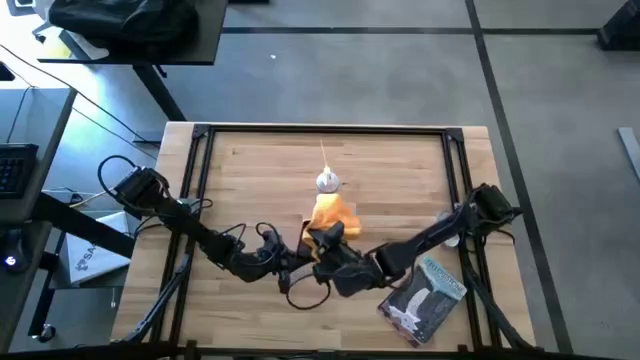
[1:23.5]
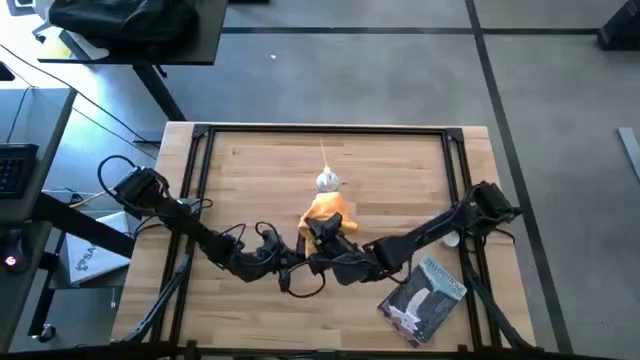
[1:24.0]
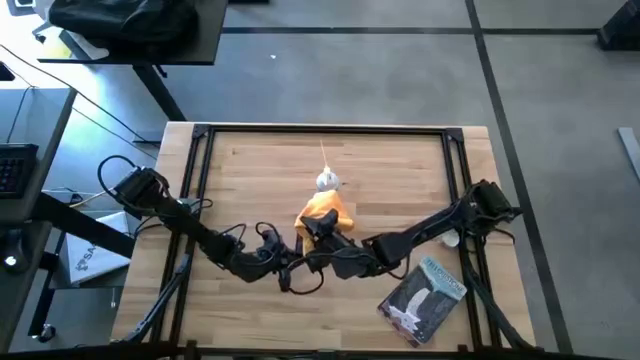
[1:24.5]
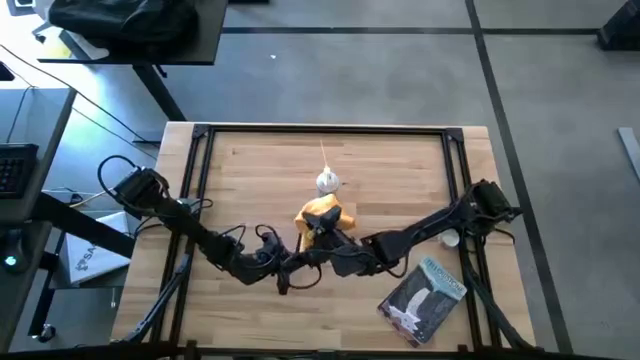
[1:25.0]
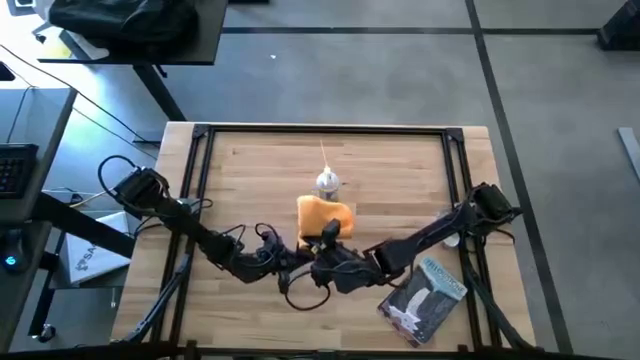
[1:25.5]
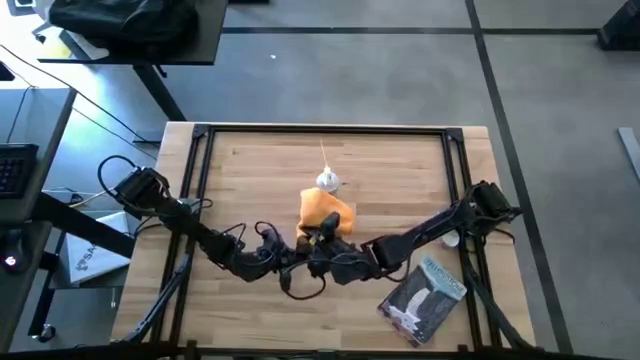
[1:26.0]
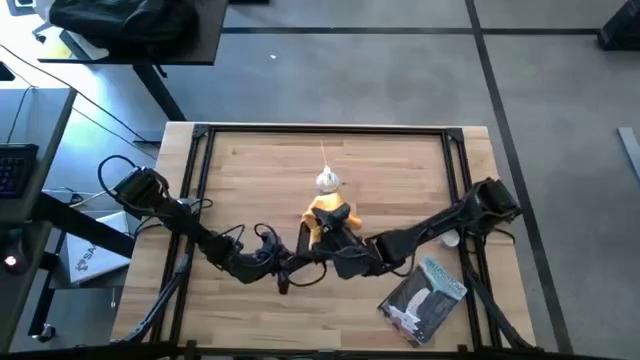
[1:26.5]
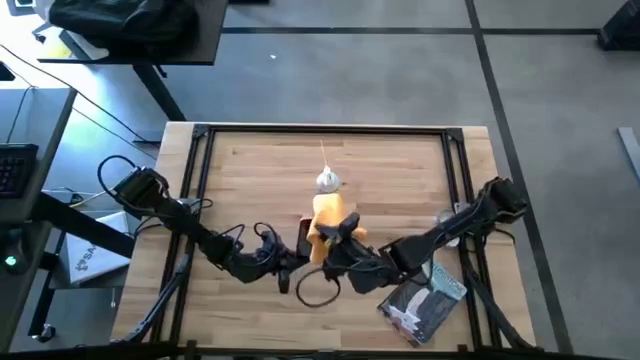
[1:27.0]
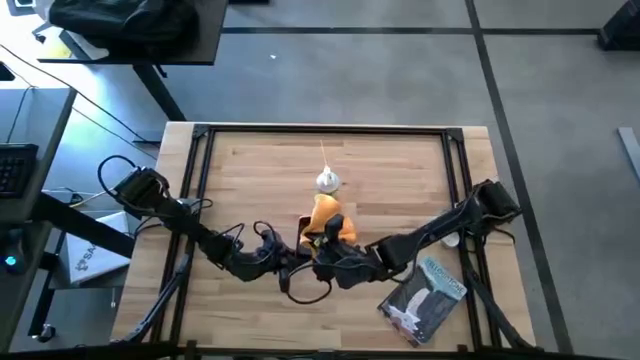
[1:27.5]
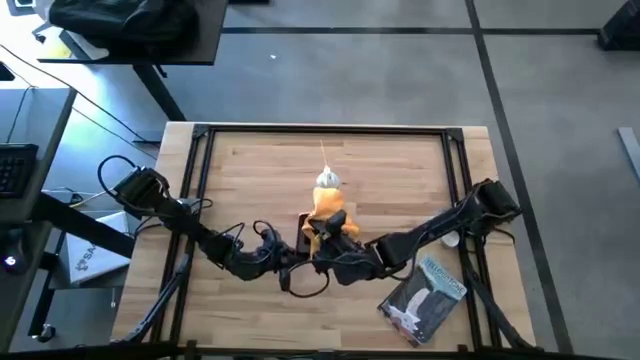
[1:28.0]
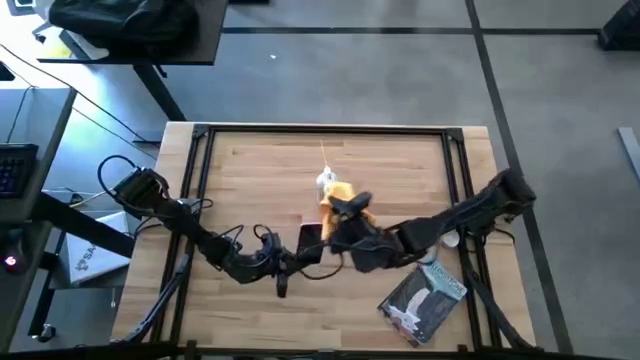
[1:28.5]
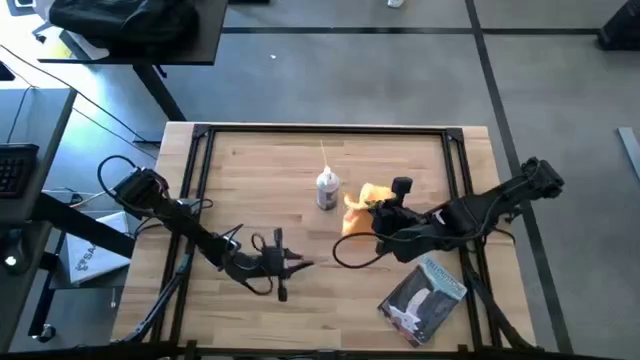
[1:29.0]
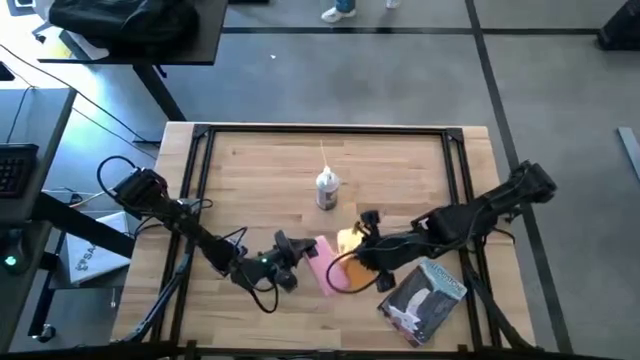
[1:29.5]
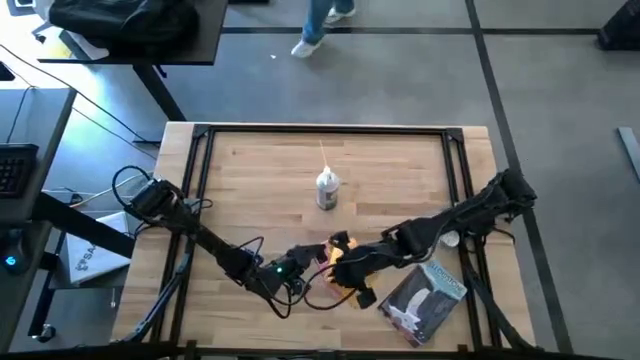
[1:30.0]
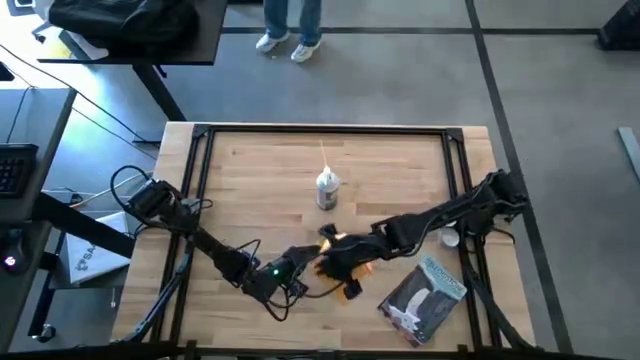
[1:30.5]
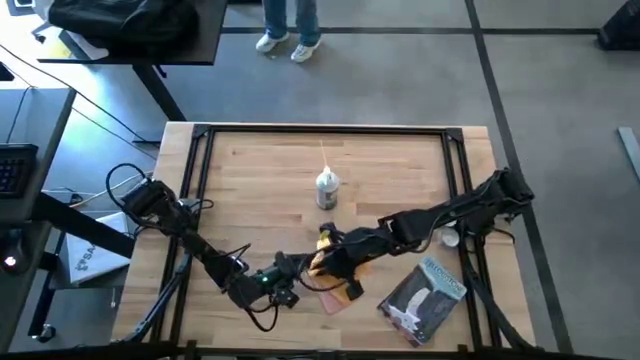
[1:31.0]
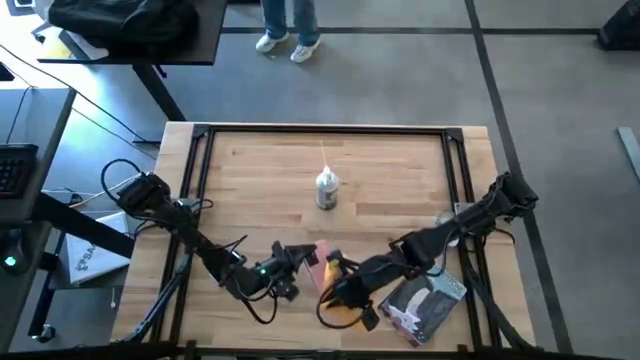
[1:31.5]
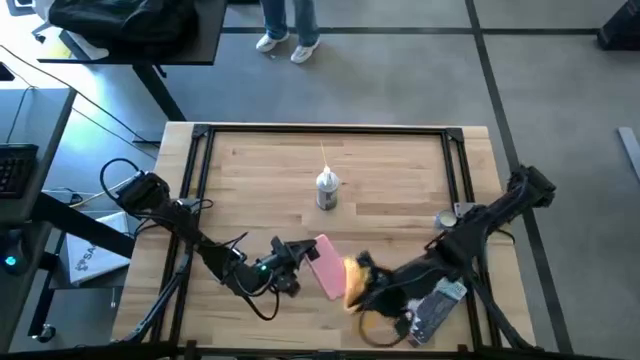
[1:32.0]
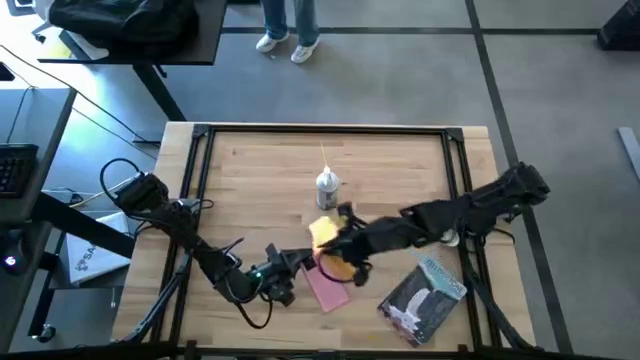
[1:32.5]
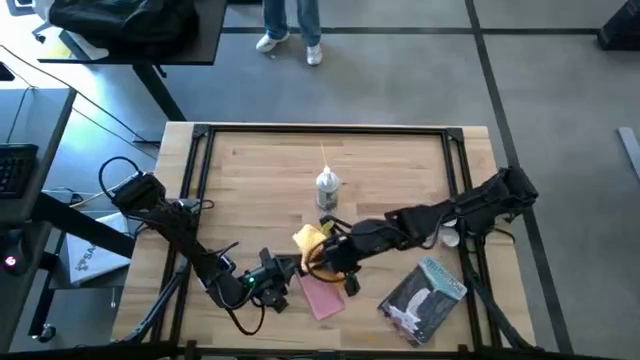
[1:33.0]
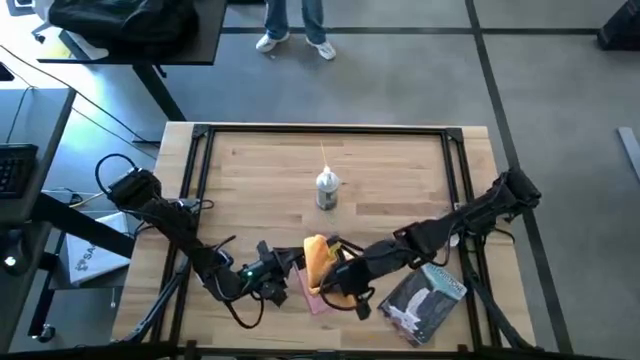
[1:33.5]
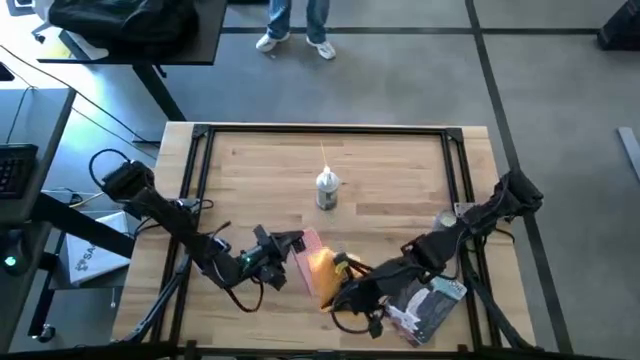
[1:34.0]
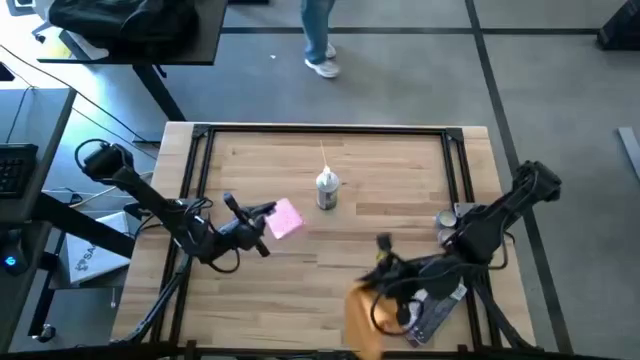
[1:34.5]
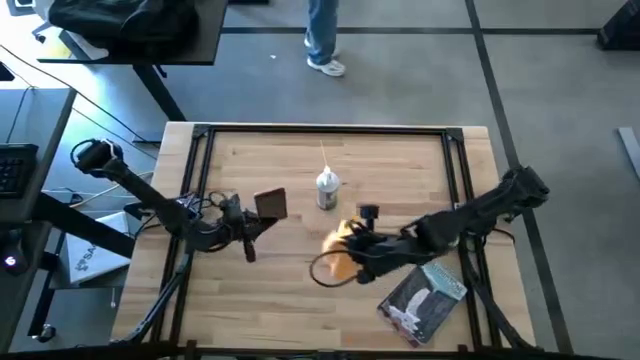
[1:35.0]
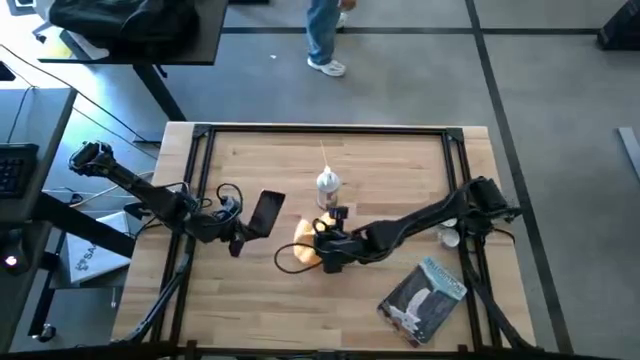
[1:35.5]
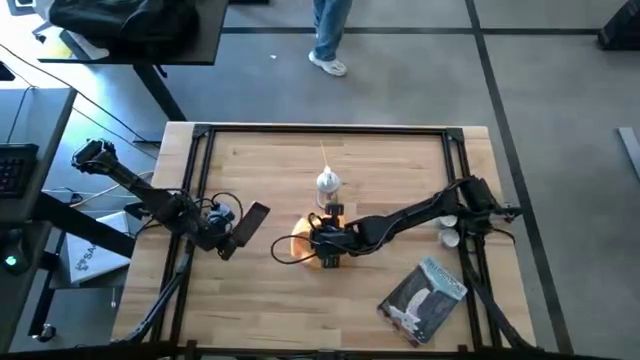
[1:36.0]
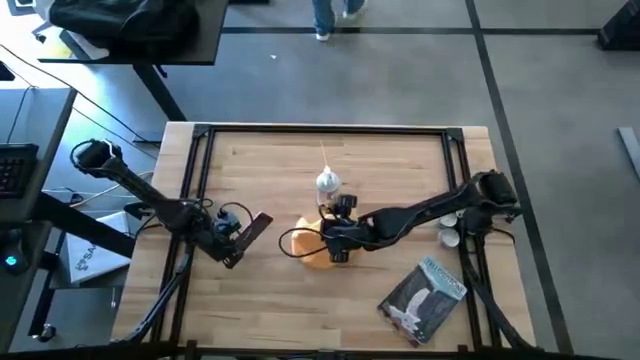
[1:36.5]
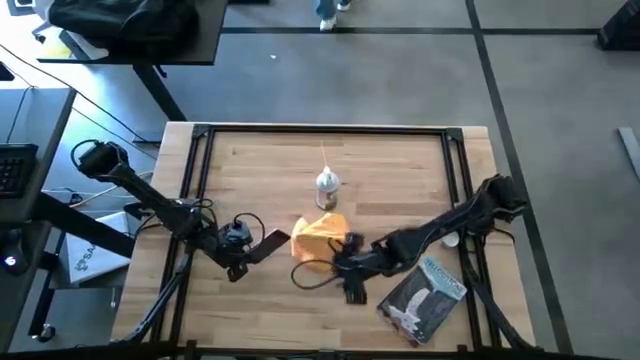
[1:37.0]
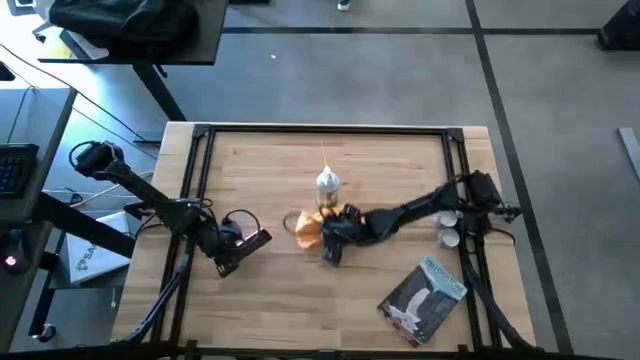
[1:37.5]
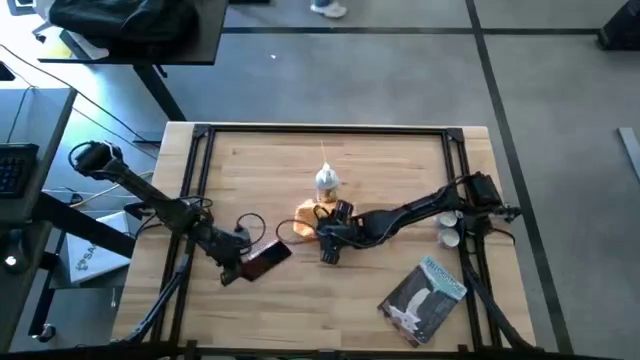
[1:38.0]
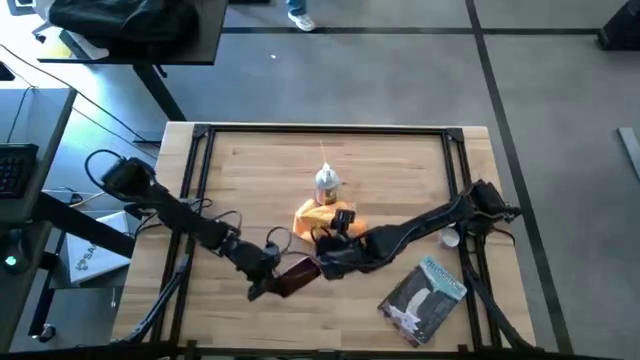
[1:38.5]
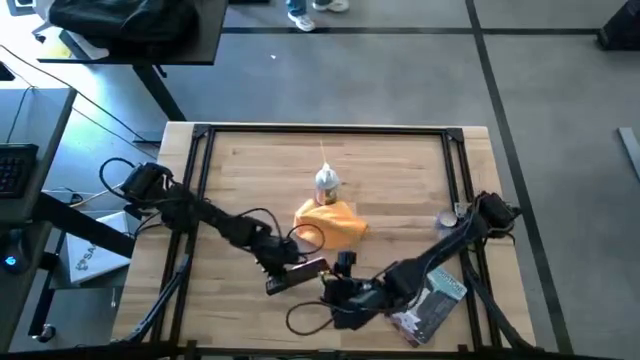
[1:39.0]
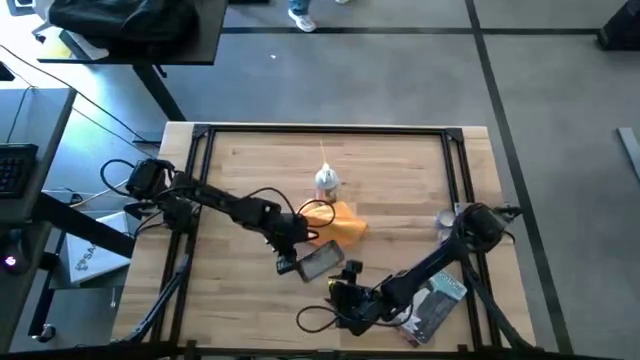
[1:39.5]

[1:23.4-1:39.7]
Task: Apply microfiber cloth
Wipe the phone with the microfiber towel

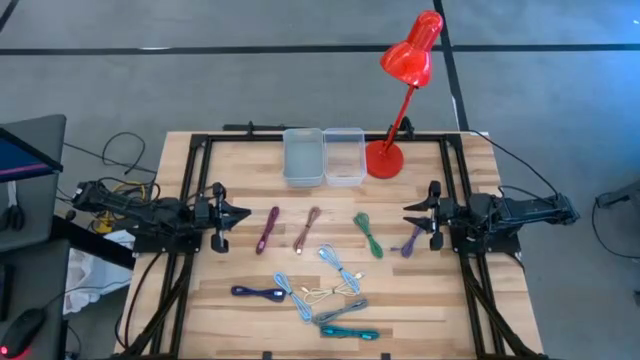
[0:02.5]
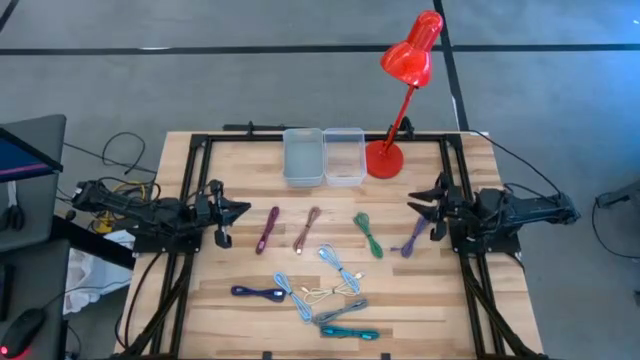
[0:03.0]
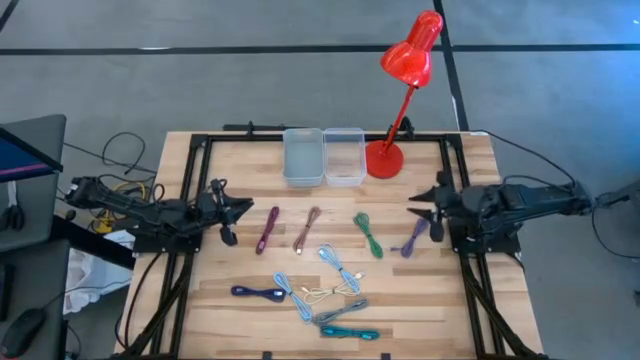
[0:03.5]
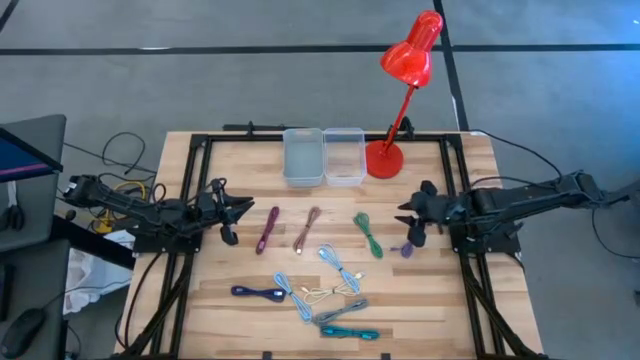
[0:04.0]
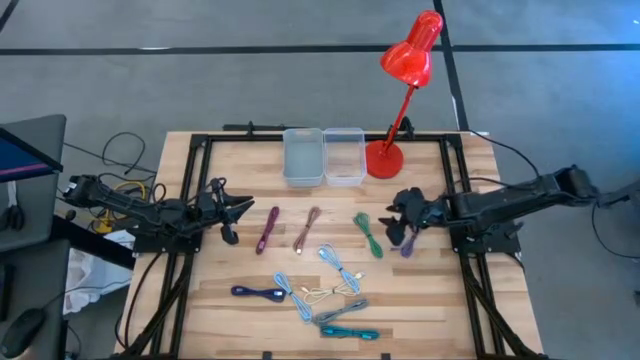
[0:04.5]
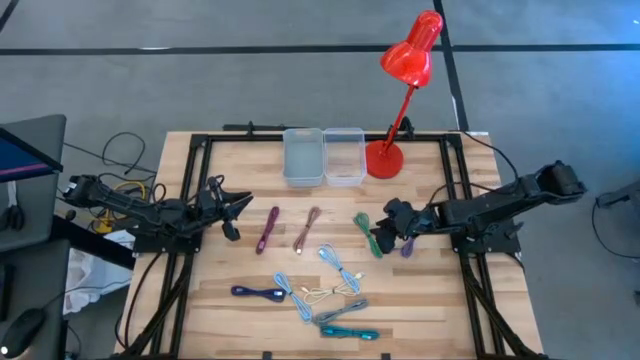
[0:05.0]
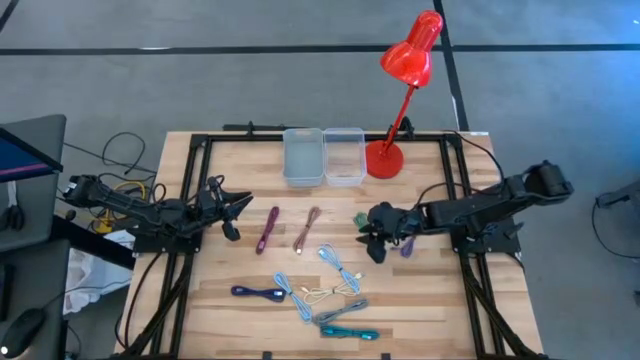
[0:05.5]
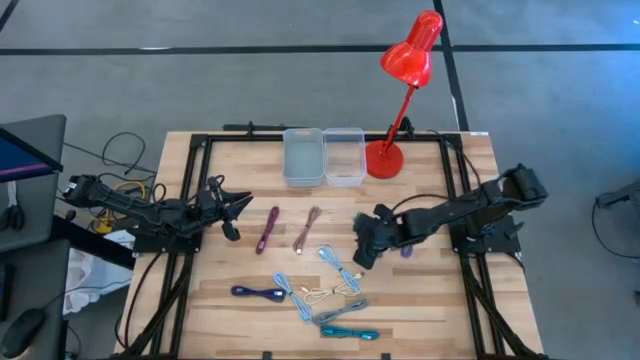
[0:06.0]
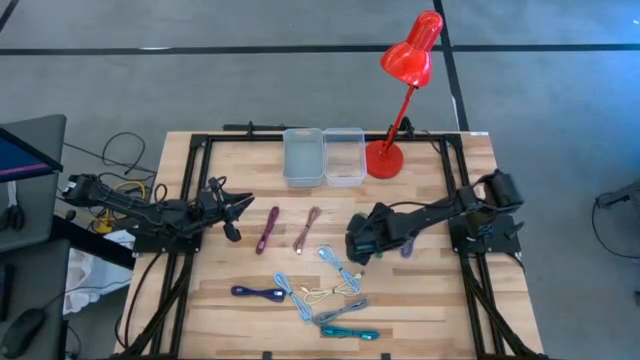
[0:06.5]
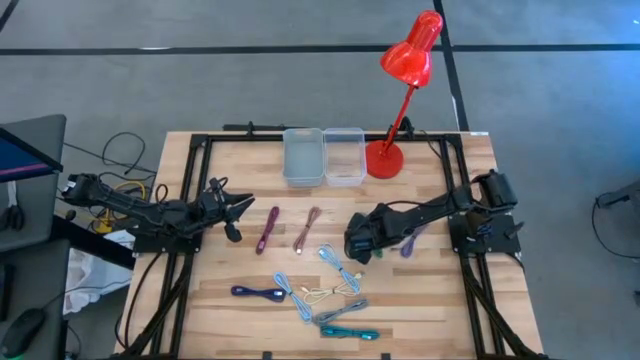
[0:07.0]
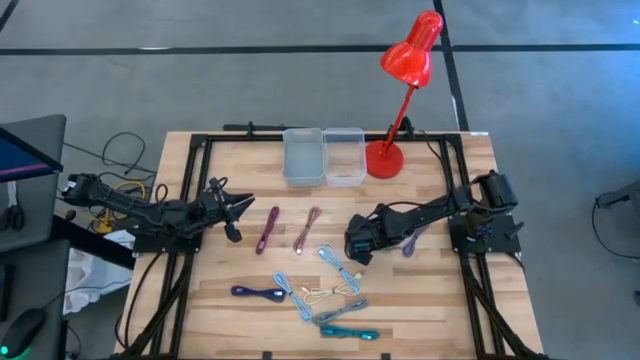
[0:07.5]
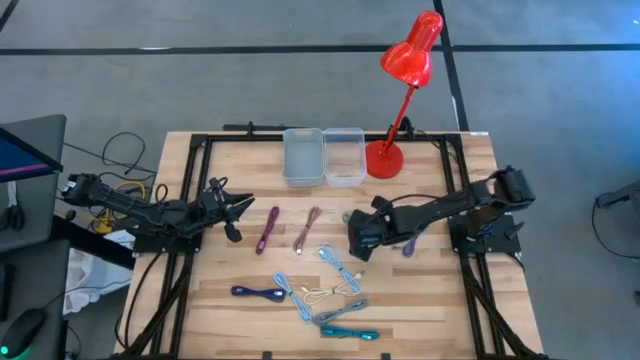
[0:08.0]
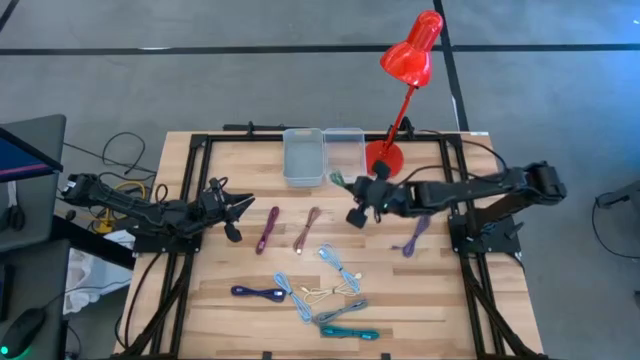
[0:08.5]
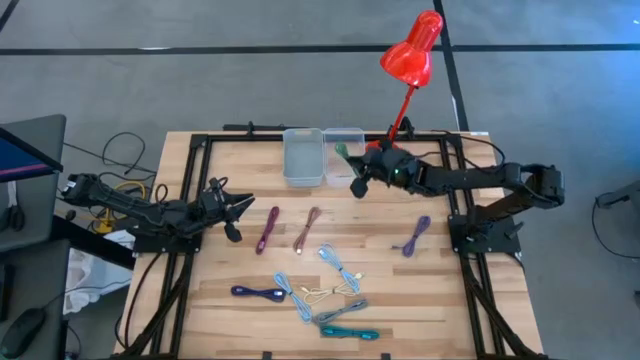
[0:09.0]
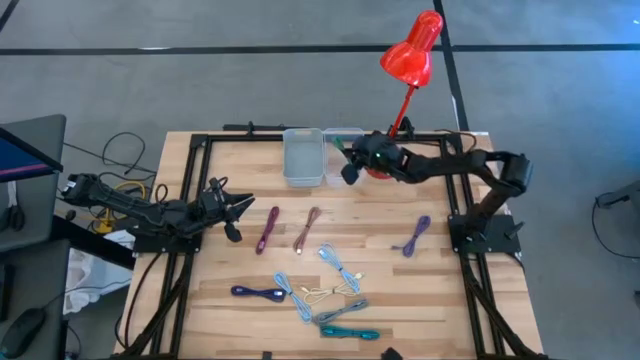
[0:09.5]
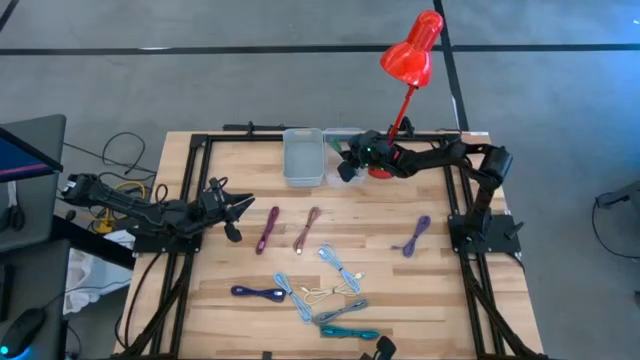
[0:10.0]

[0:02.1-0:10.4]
Task: Pick & Place USB Port
Put the green charger cable into the transparent bin
